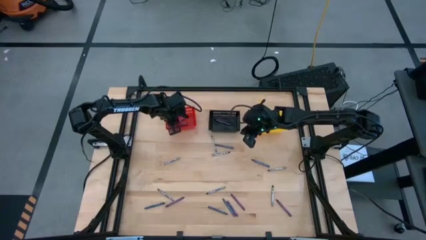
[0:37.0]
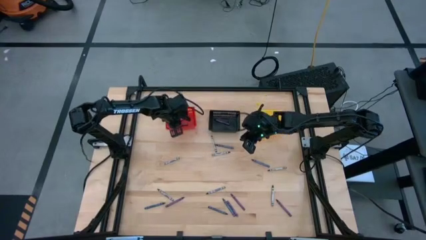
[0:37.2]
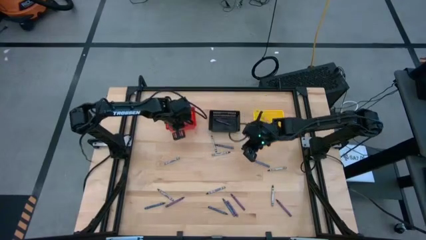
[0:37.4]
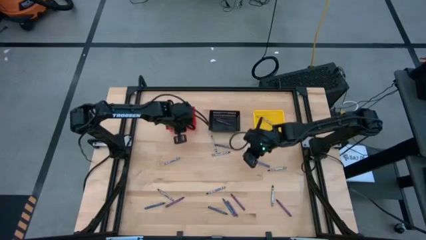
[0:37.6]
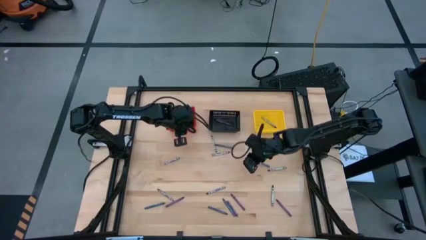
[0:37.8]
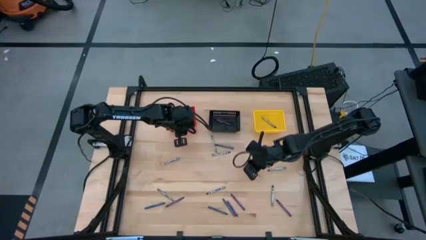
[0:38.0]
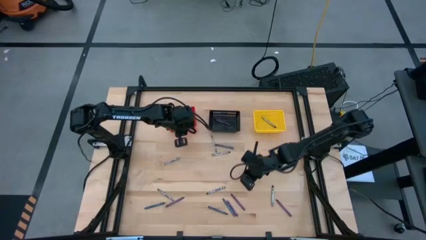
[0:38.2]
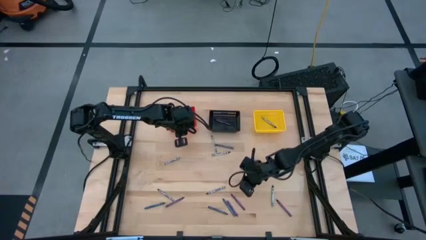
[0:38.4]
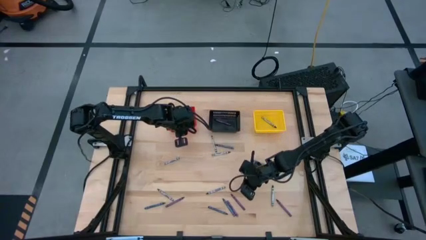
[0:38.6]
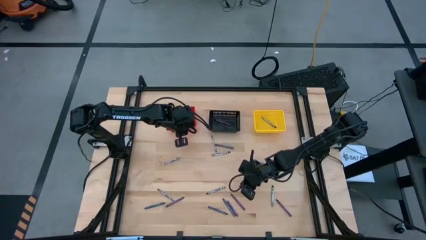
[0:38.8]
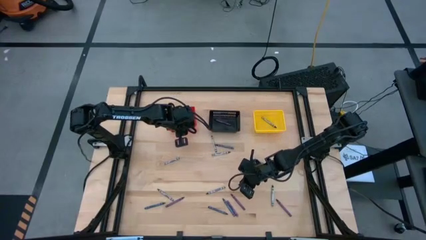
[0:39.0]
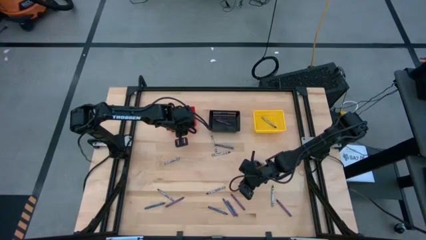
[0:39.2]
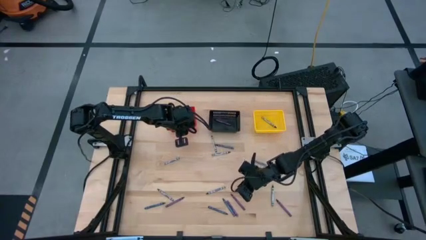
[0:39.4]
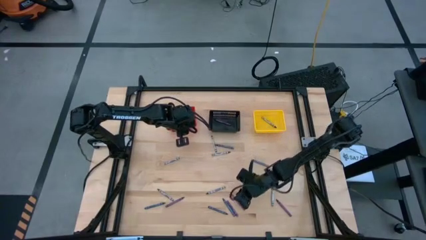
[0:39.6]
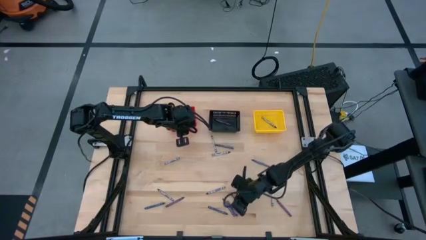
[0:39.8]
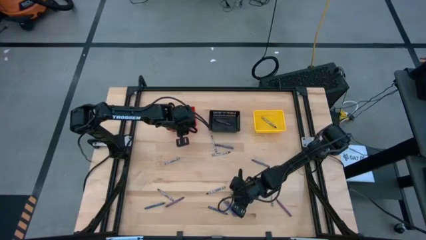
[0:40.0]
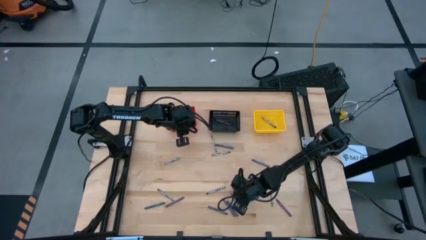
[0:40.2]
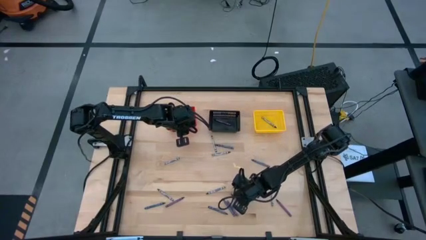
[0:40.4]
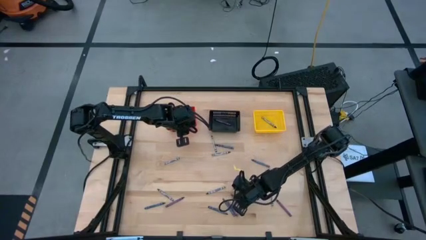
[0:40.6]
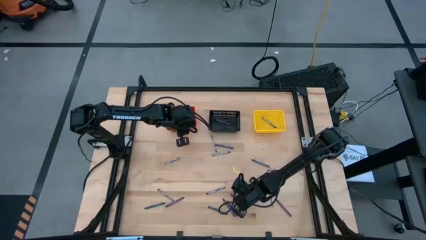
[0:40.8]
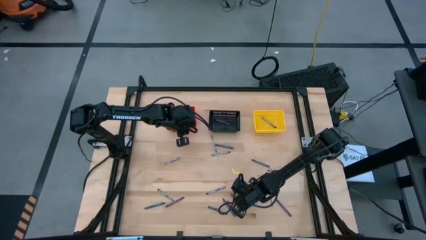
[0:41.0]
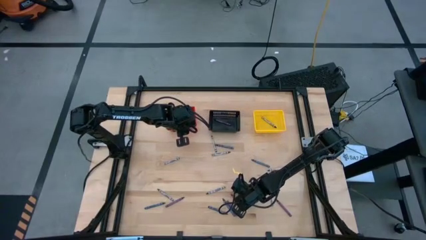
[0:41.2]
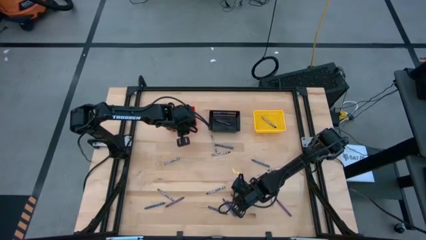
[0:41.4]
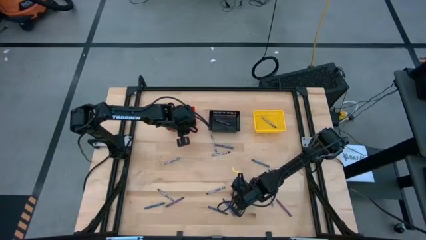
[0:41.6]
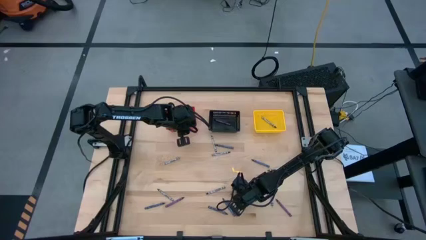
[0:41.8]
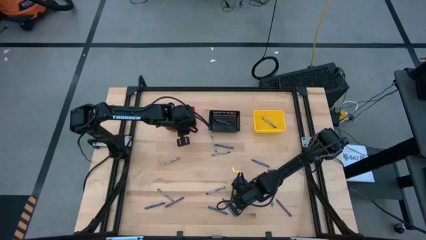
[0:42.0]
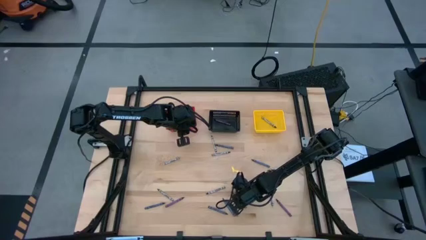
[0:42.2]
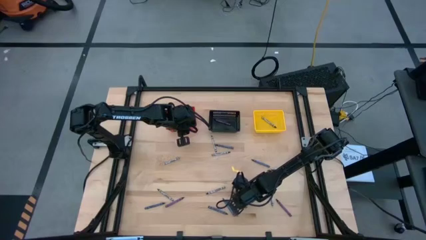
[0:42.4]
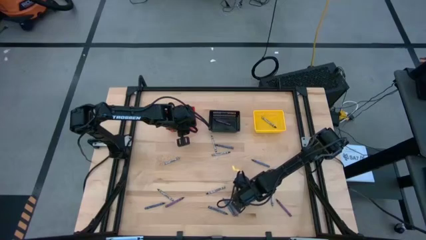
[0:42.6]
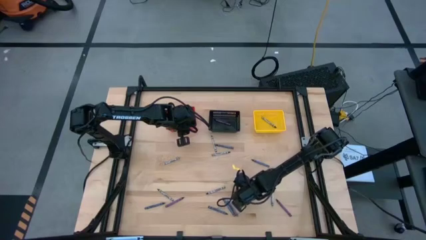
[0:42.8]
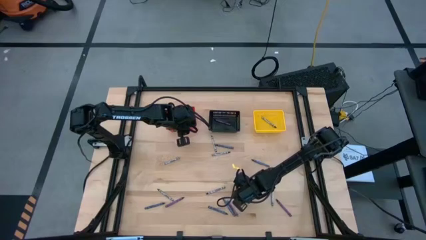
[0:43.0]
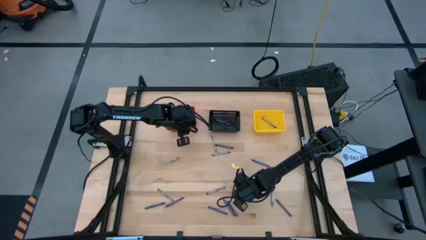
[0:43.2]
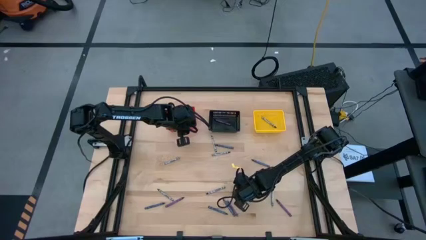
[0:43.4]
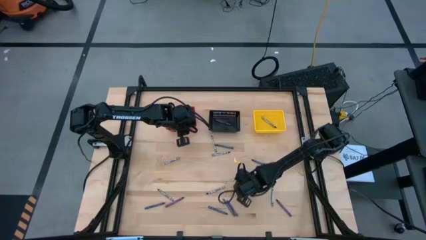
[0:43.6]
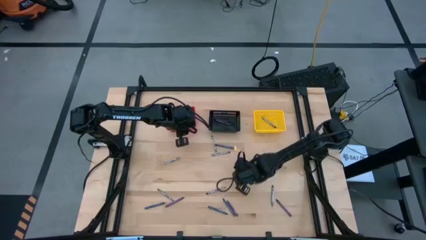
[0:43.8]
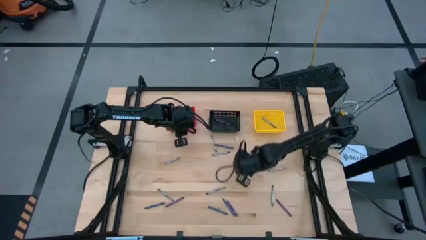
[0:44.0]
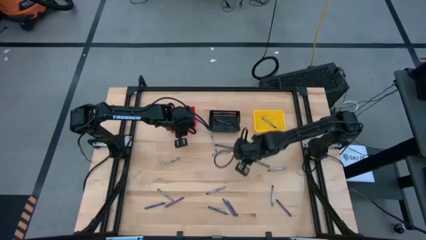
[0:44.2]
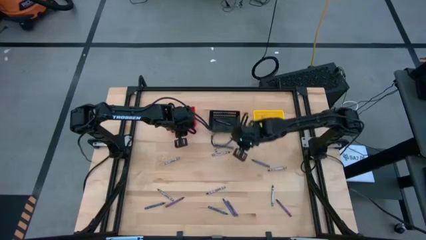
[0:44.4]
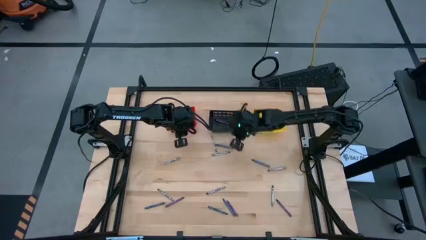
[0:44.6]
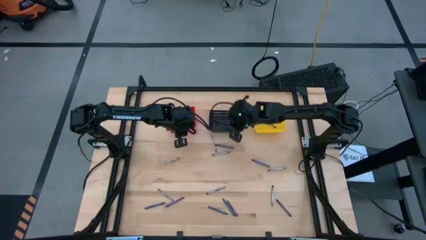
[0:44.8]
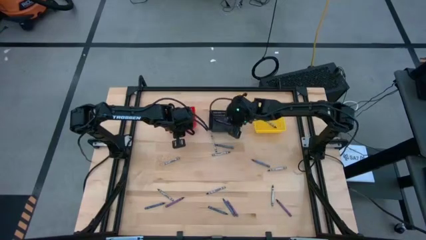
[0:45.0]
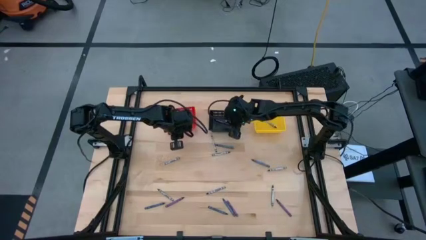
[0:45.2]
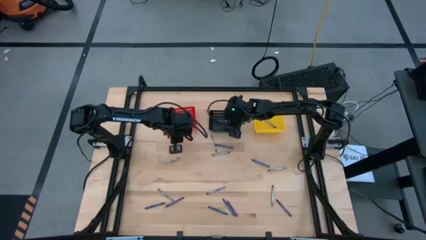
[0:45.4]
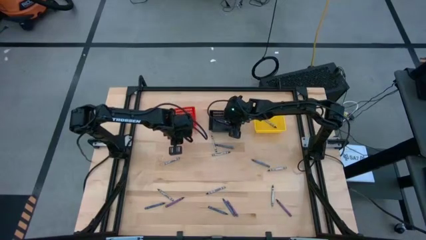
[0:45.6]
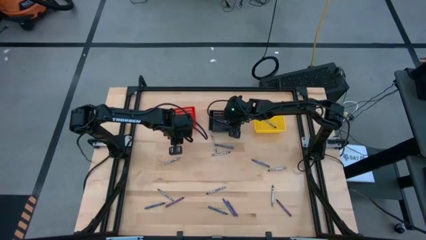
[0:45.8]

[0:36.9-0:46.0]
Task: Sort crayons
Put the violet crayon into the black bin

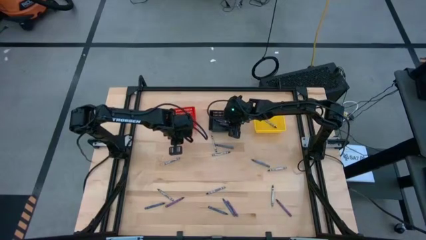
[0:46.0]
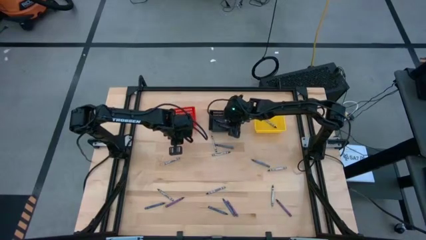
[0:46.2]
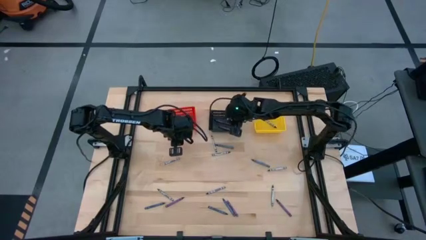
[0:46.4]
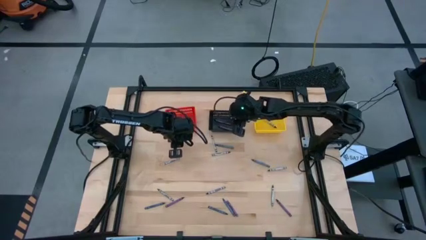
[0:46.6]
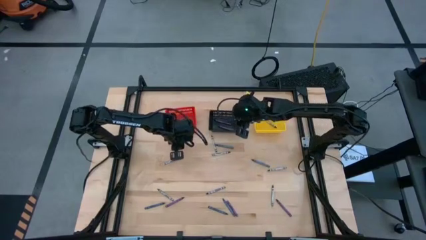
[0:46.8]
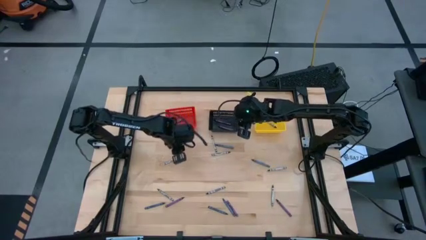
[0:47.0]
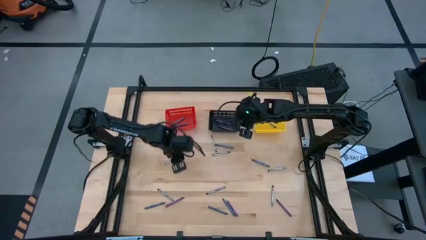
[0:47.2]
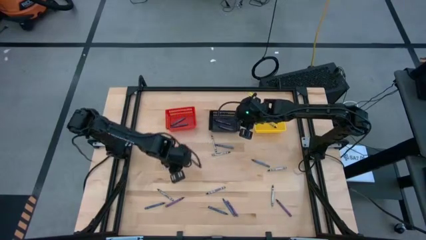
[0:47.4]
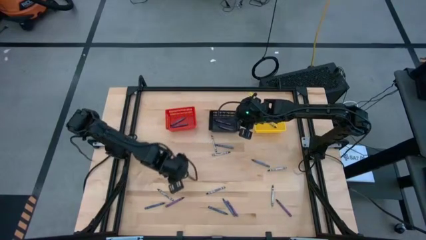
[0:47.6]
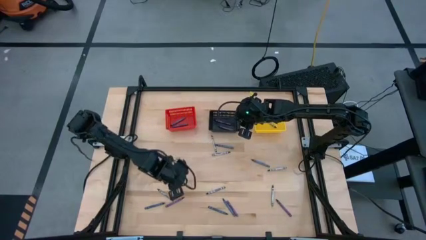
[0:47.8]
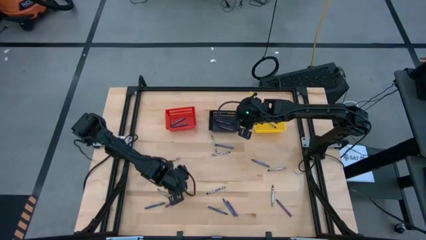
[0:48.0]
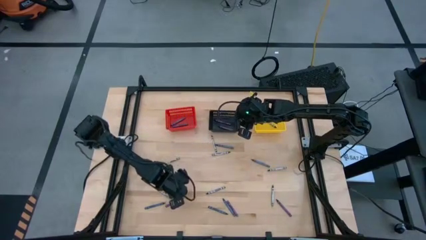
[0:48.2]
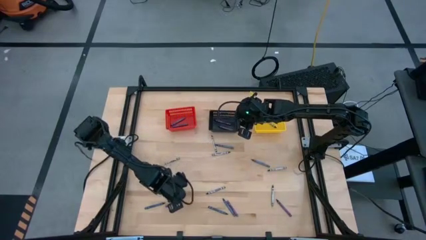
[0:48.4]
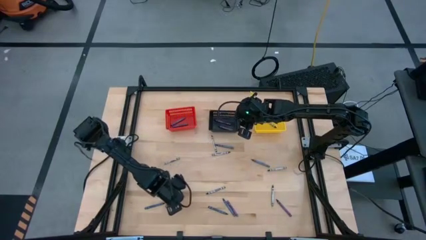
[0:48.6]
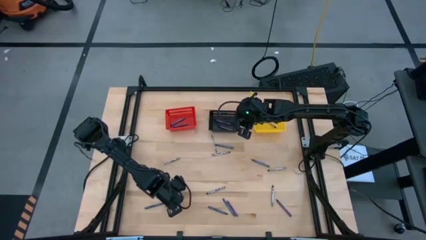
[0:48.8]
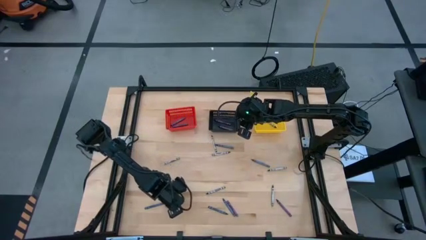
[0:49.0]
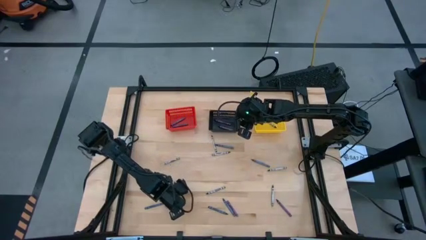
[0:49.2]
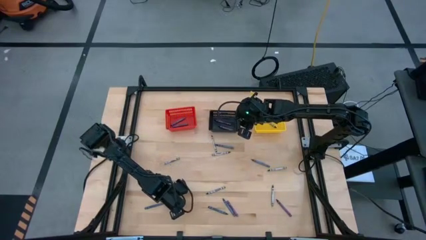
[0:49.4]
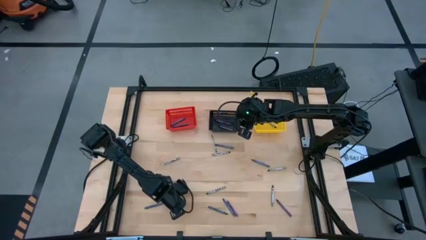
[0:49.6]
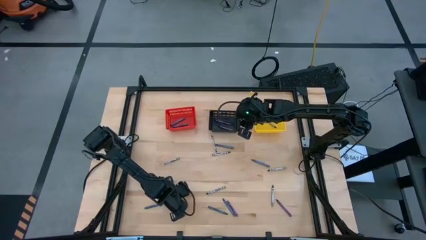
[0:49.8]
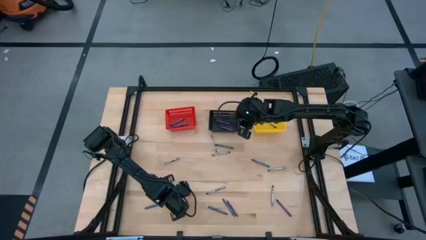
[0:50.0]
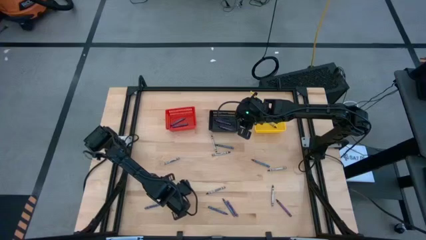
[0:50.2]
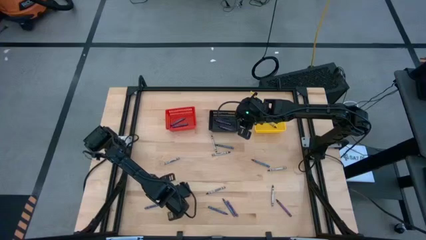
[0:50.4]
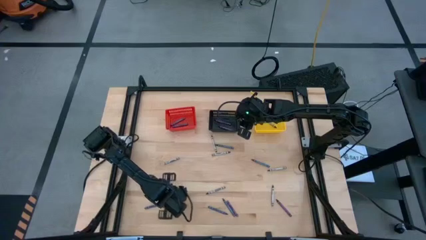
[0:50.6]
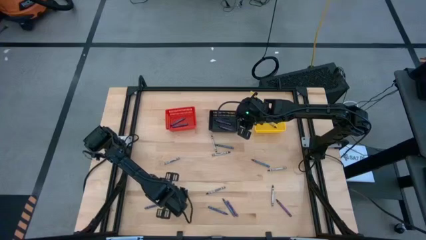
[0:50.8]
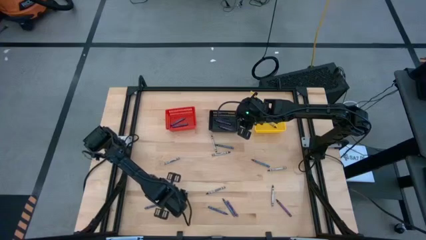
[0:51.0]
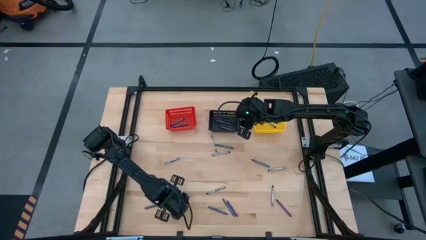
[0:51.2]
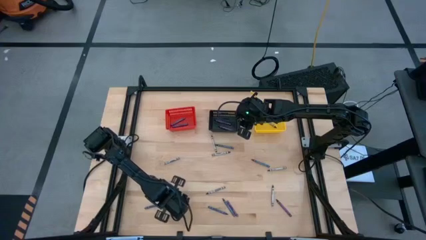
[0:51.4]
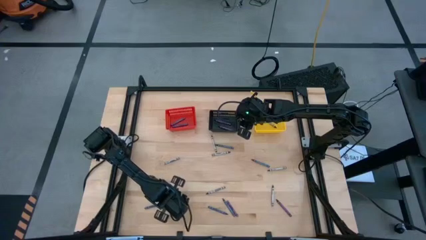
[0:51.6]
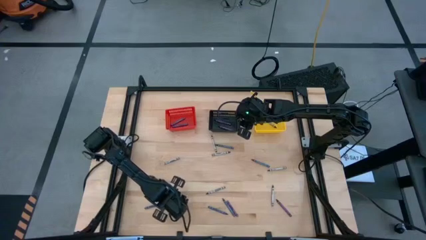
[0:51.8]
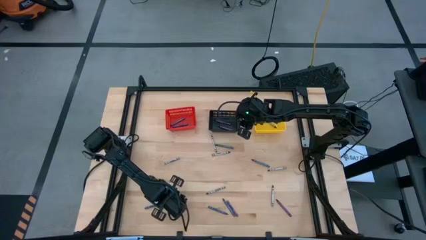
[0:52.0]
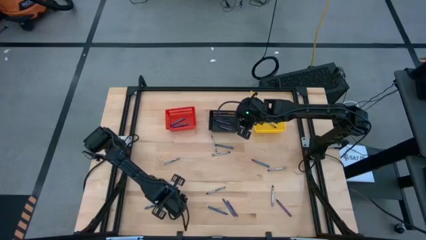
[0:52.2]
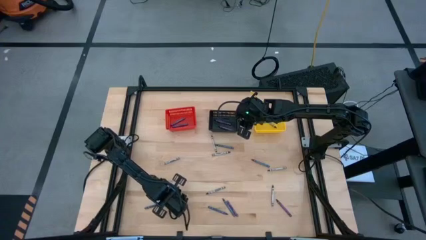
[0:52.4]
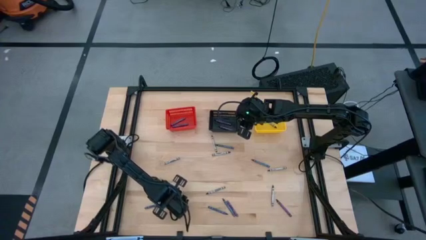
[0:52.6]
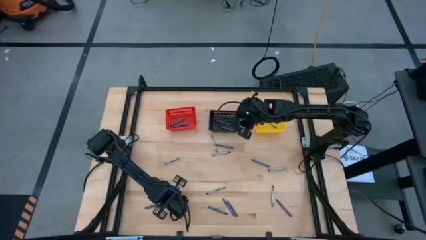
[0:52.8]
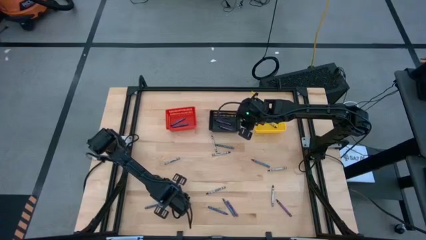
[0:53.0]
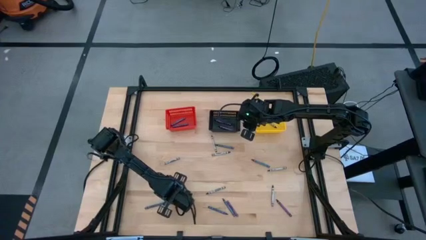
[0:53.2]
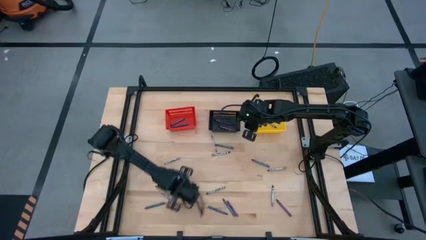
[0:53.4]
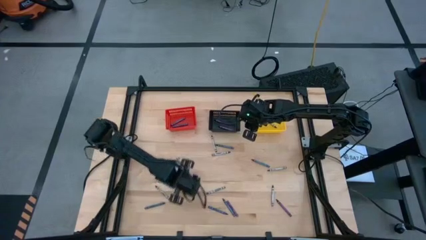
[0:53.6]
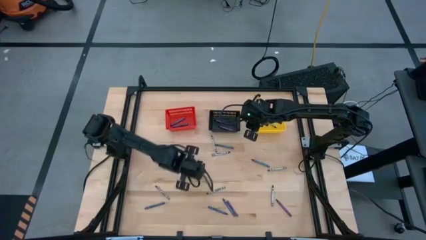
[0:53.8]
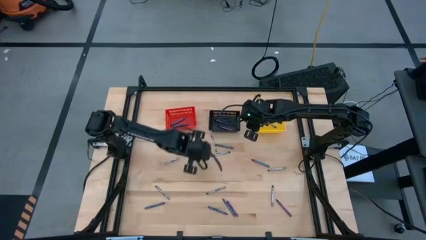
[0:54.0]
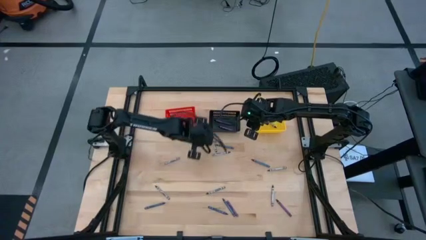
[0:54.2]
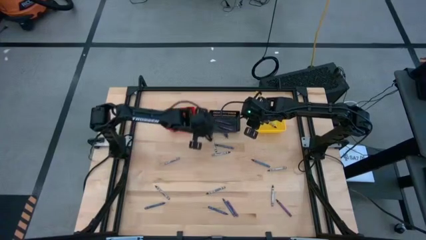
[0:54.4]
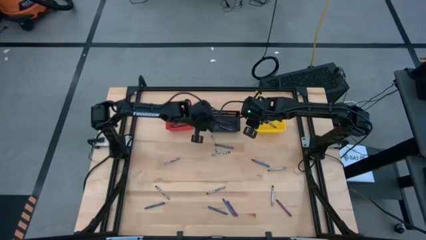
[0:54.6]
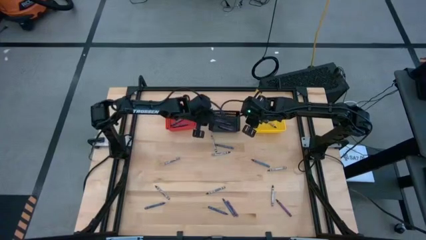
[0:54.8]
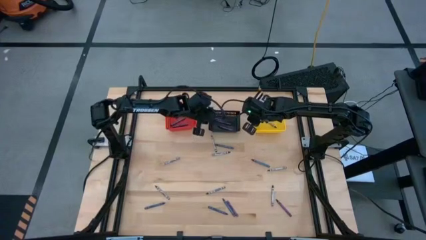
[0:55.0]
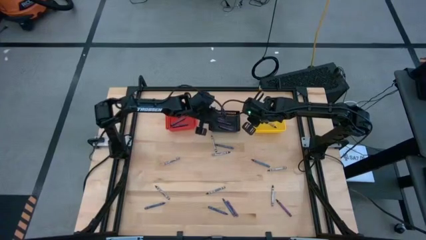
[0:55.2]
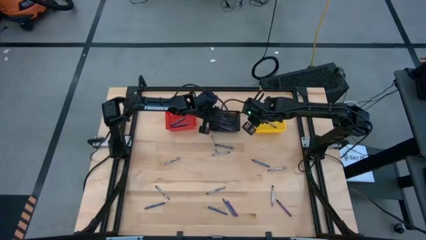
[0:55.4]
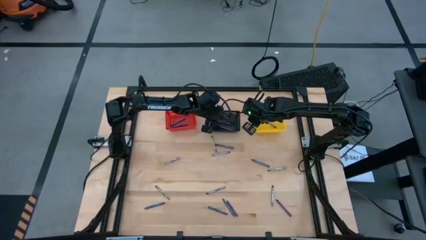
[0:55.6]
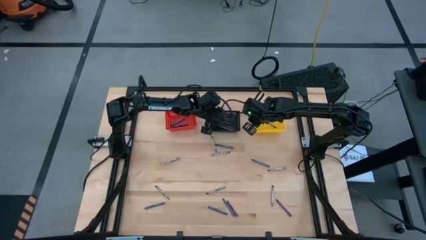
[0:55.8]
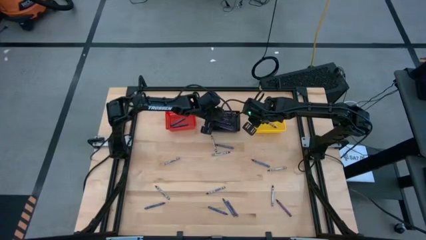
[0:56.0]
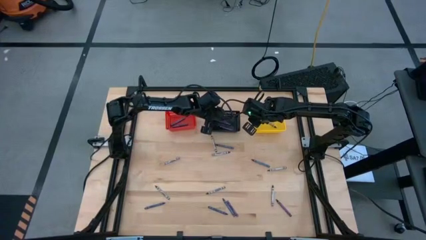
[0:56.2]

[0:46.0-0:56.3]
Put the violet crayon into the black bin
